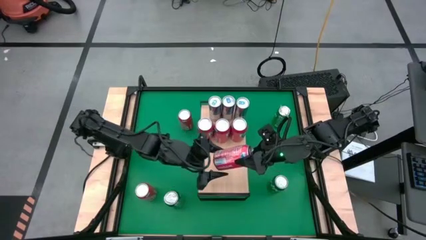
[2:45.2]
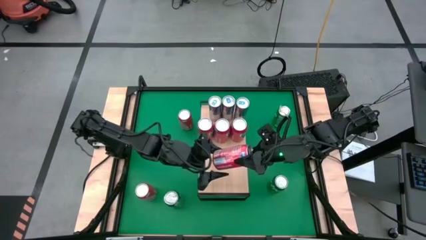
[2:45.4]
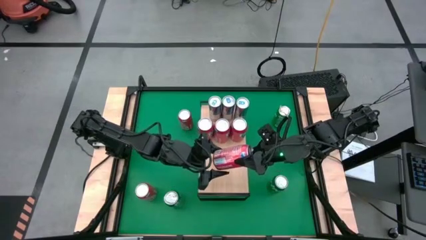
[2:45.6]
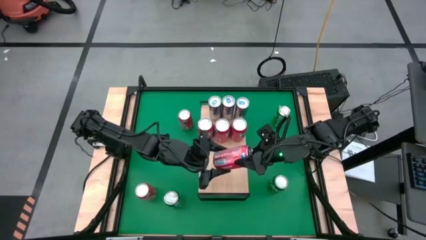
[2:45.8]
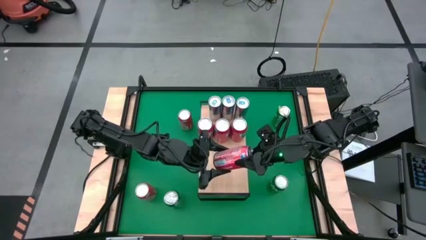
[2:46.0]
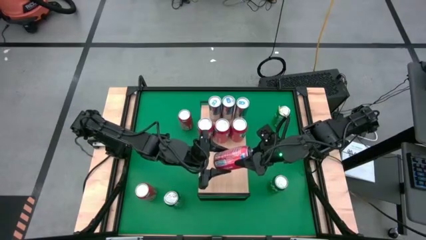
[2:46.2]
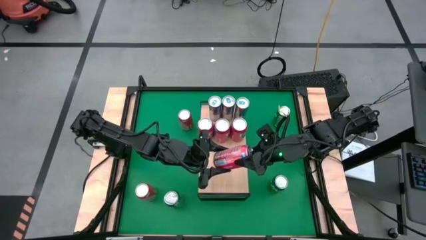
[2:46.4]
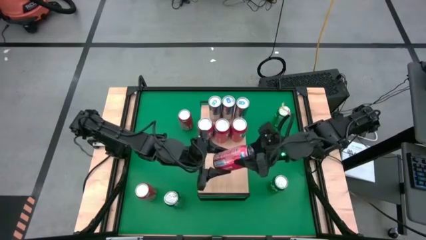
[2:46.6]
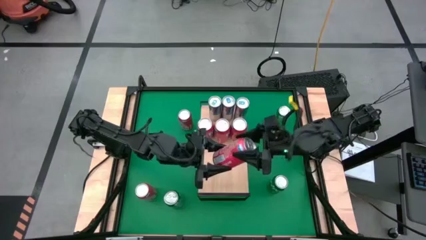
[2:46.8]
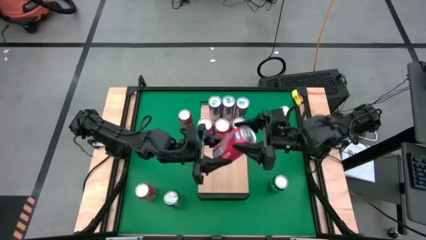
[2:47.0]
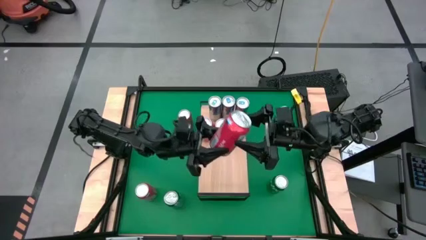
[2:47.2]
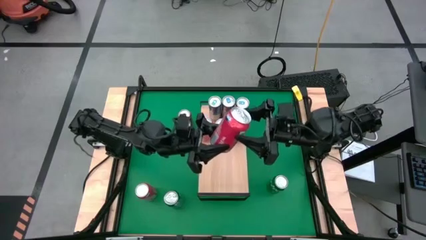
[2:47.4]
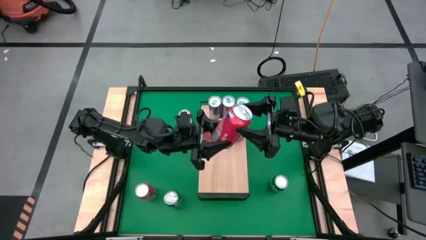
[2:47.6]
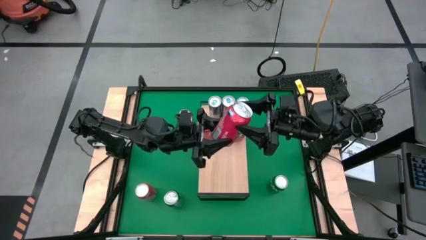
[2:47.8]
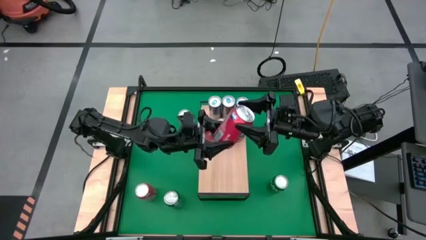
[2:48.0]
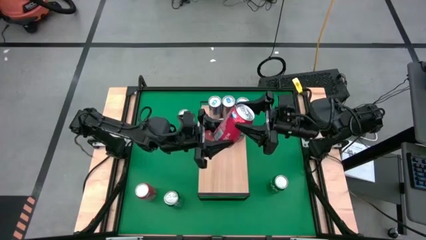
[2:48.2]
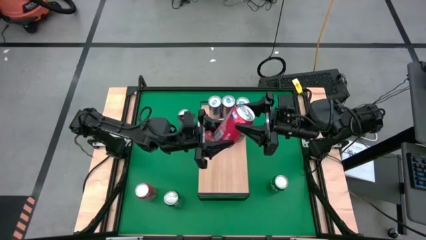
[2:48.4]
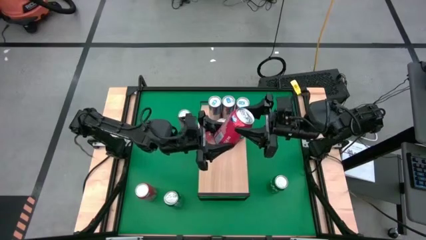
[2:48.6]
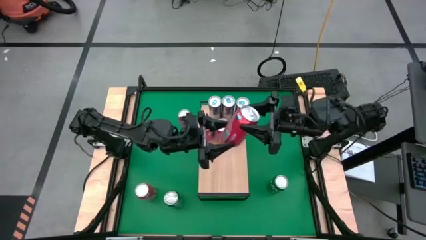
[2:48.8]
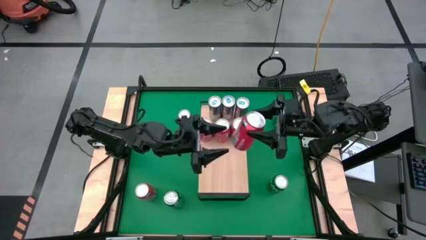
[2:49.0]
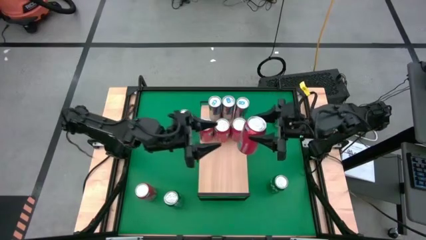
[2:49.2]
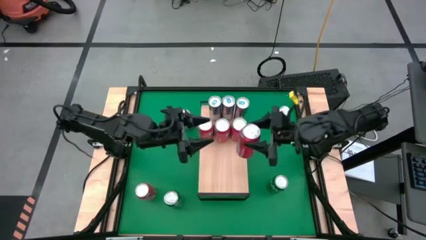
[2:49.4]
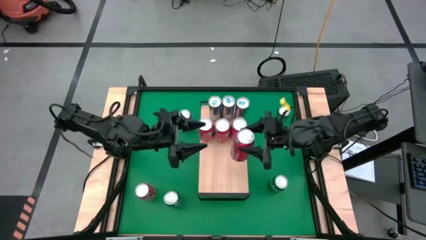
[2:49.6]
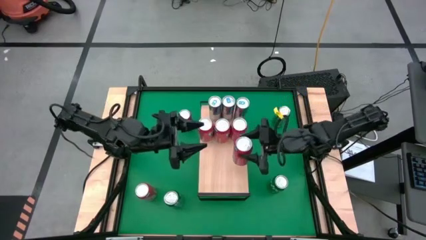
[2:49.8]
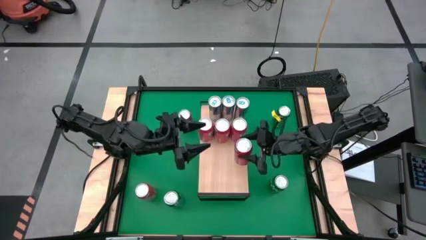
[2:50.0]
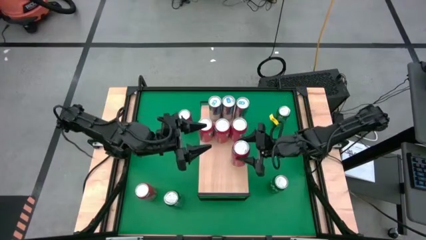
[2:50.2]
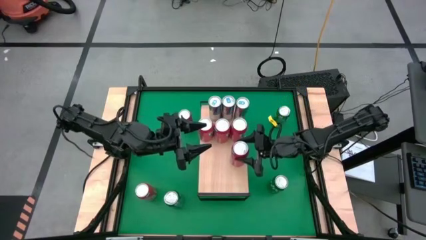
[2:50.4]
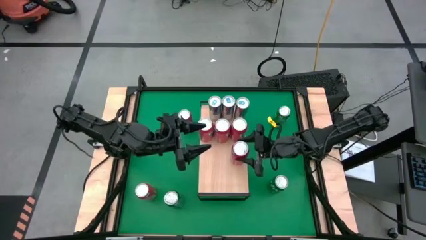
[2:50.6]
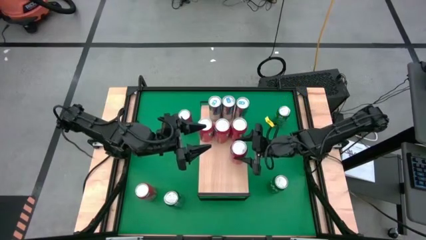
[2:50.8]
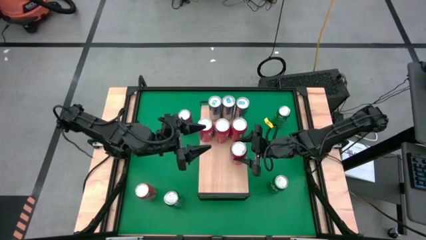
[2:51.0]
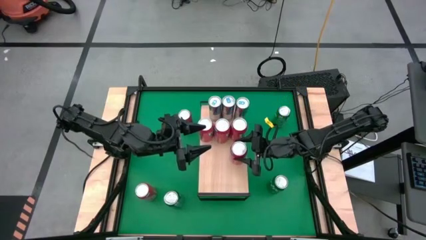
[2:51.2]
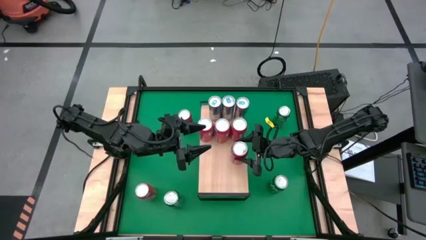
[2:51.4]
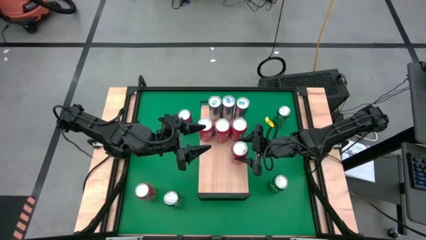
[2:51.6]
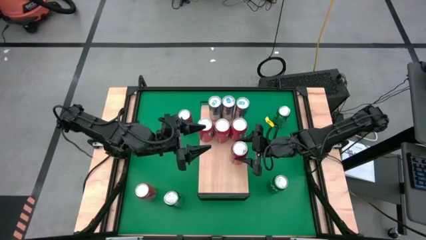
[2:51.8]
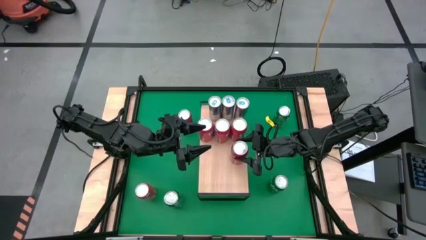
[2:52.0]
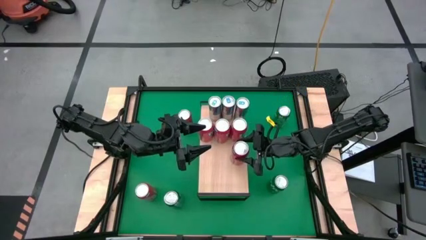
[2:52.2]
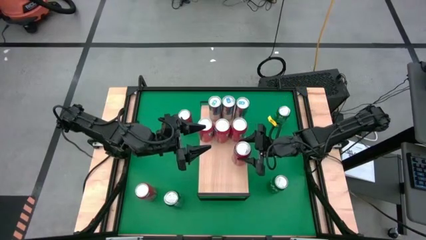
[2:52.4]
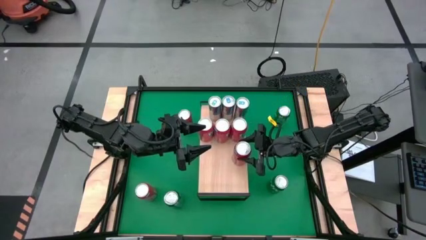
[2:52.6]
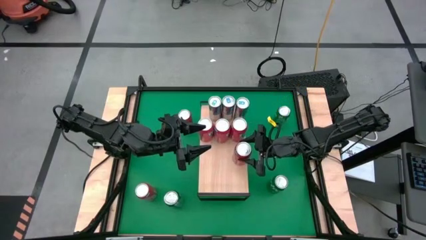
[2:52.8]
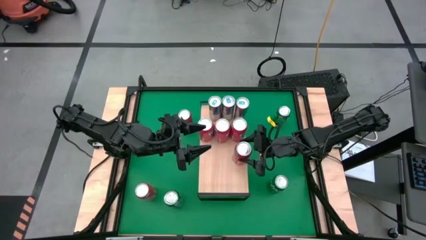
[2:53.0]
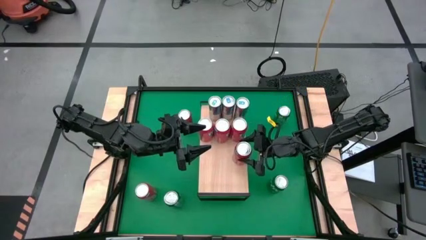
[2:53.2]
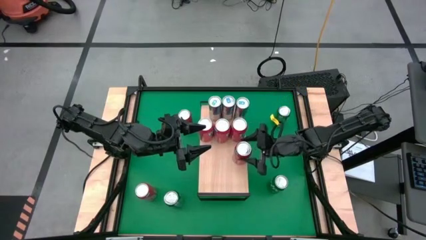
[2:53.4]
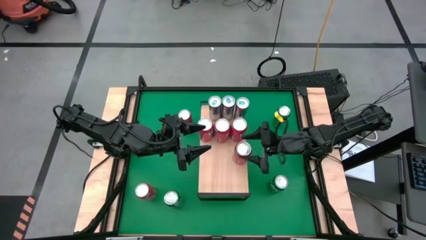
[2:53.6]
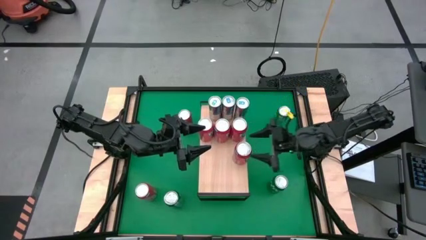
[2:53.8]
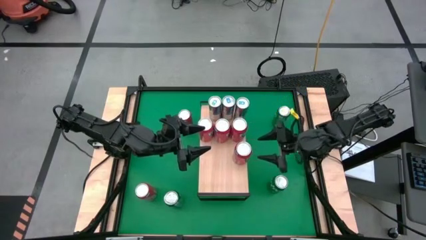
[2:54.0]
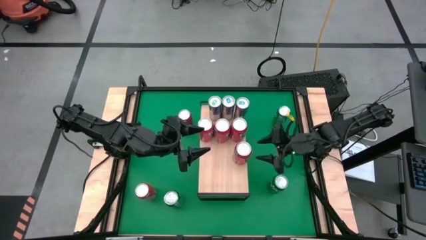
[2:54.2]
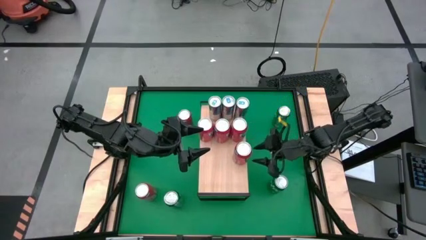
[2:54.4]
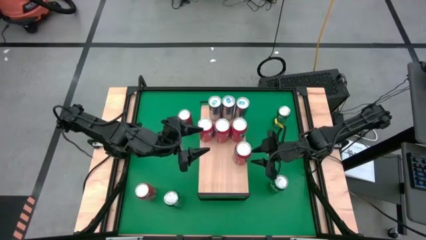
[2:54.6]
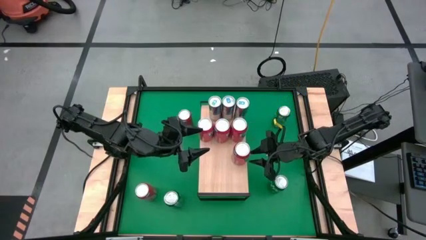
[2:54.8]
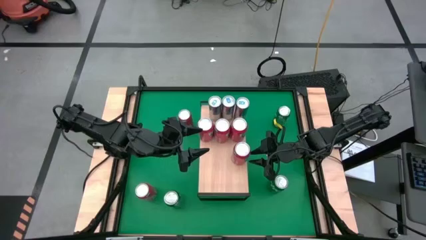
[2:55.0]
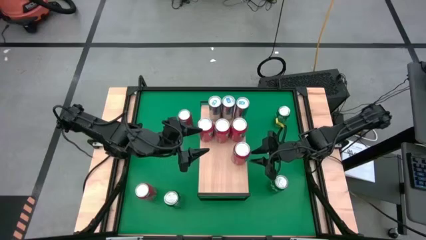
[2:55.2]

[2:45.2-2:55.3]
Task: Place canned beverage on shelf
Put the orange soda can on the shelf

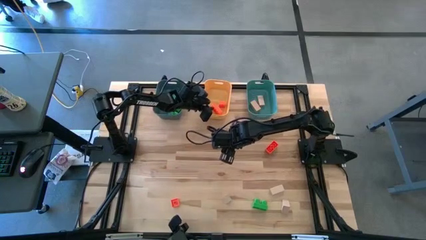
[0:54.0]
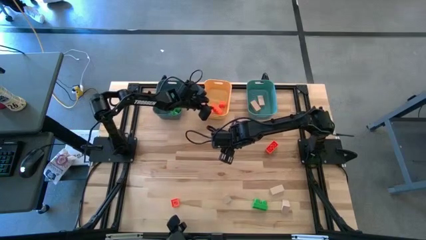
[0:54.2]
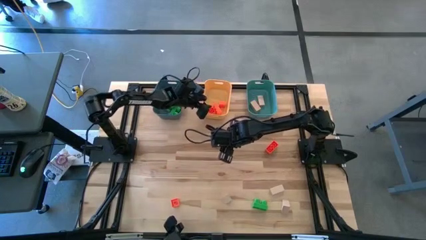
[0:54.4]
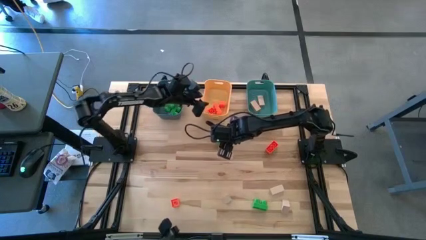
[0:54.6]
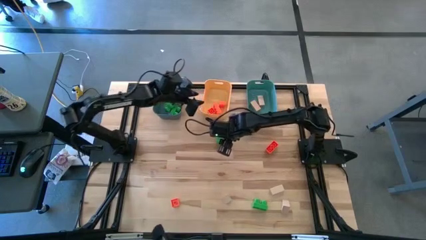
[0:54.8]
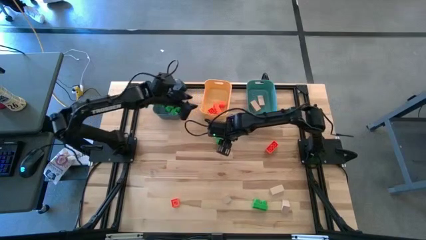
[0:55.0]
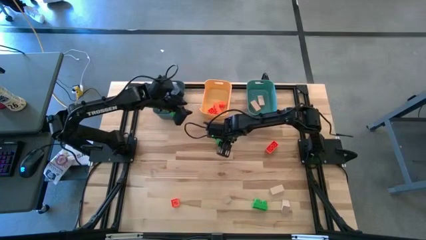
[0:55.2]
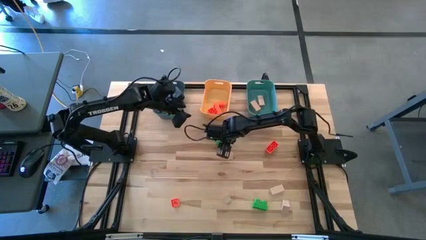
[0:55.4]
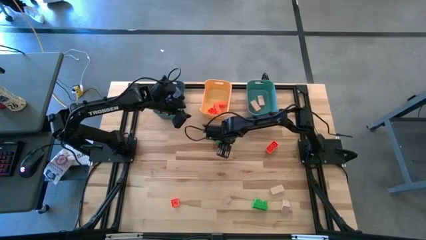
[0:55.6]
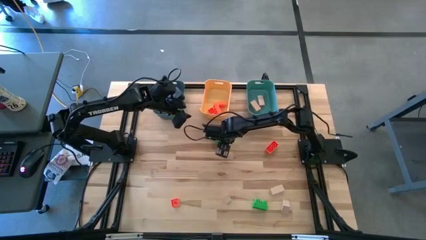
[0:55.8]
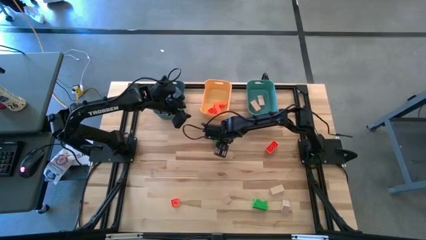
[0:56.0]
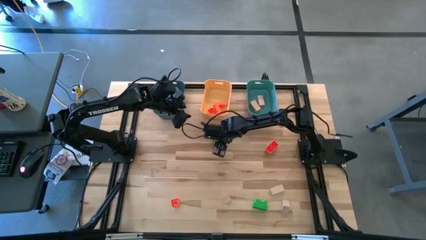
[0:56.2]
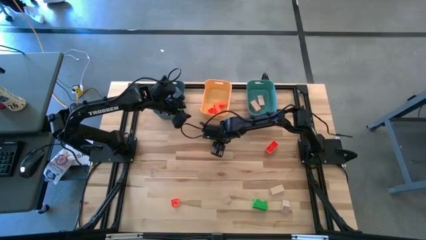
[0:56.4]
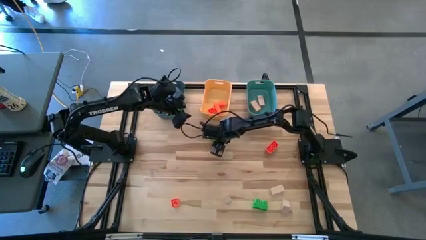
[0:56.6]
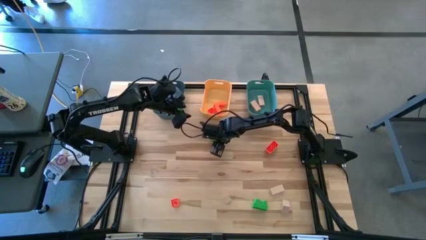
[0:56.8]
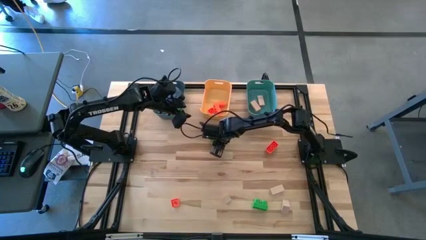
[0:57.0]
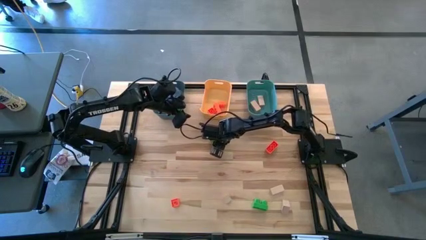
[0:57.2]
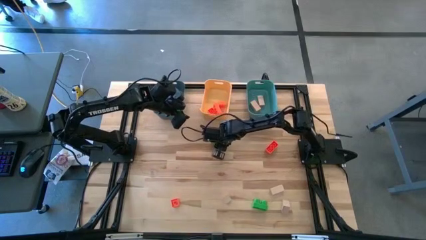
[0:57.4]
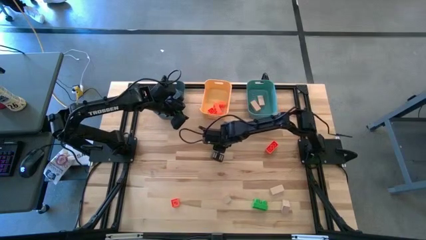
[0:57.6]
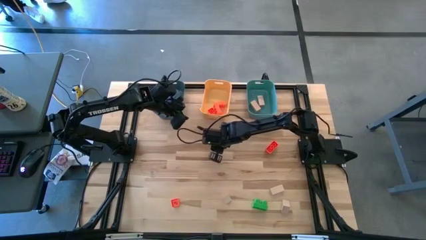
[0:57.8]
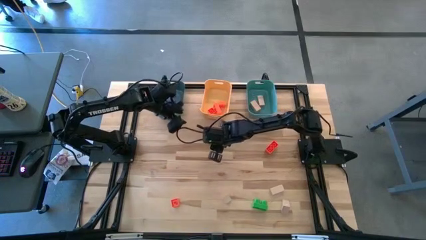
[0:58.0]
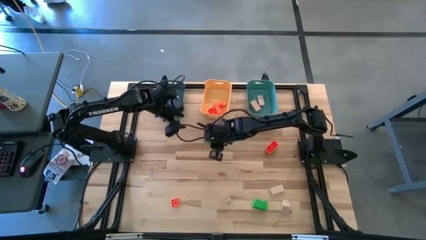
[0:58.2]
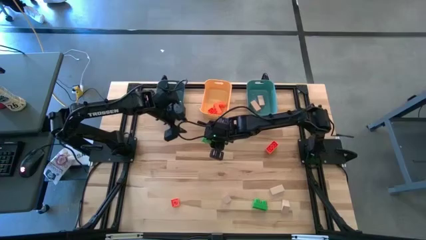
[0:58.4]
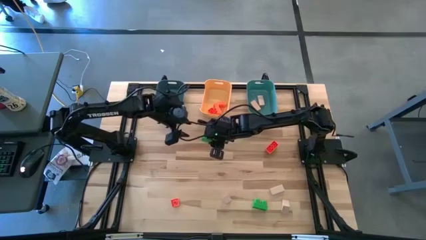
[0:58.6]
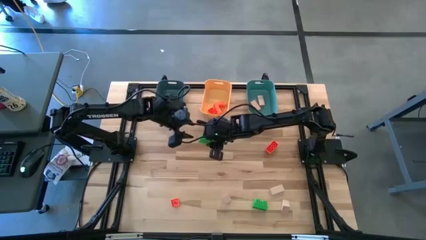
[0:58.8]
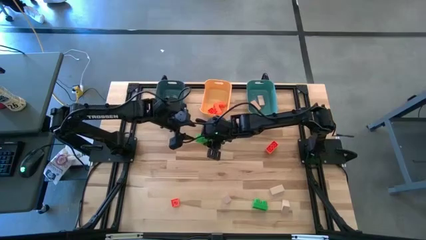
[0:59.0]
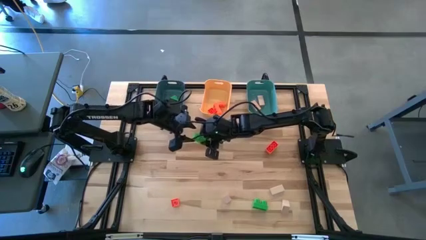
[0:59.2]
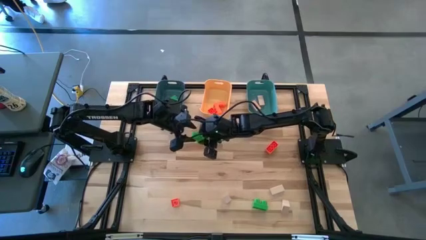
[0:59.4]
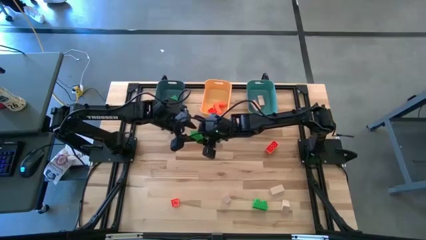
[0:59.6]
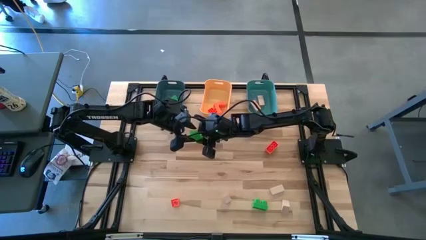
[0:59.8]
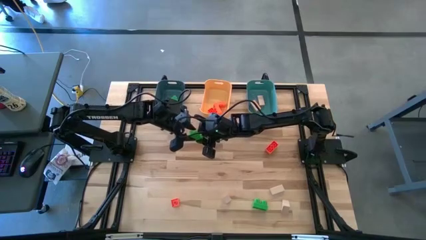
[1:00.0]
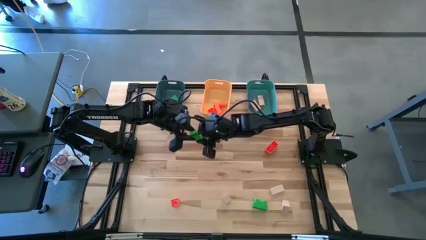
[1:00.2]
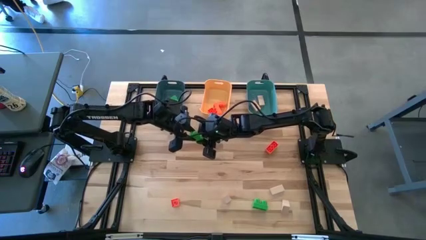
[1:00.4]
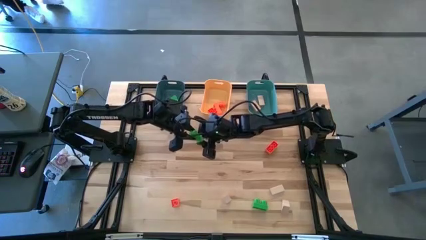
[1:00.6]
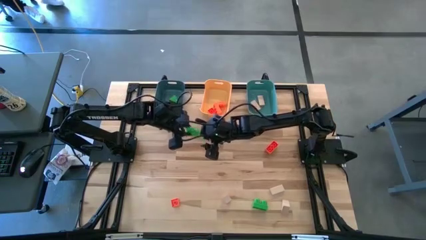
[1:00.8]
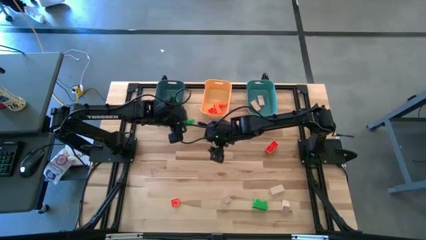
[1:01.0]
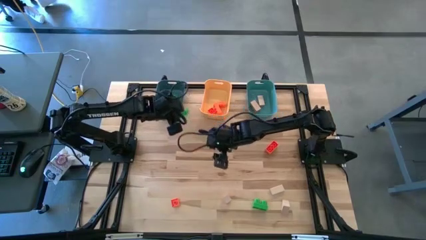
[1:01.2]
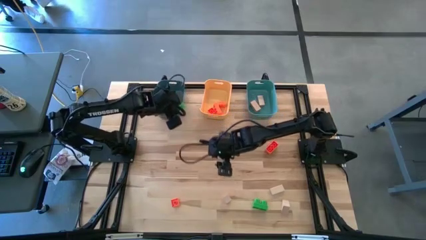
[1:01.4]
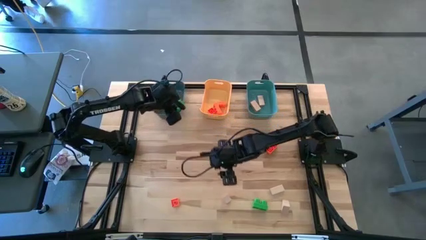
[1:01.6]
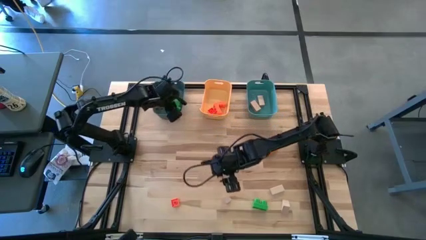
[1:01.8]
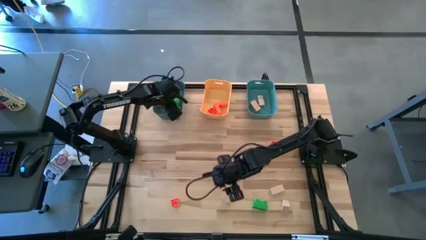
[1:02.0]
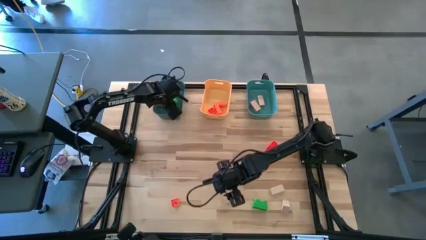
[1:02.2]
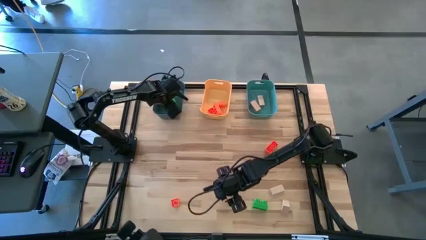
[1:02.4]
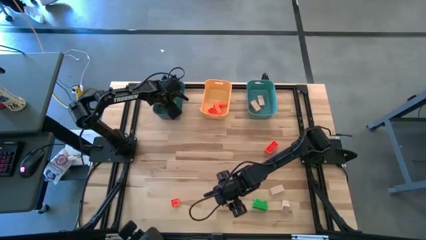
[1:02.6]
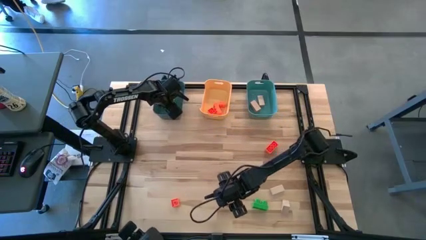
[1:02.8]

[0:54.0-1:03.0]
Task: Sort & place blocks by color
Put the green game piece into the blue bin
